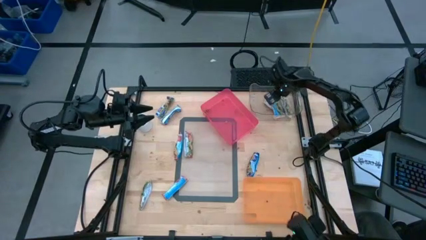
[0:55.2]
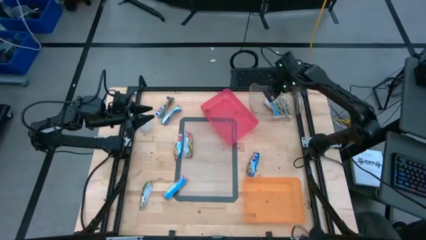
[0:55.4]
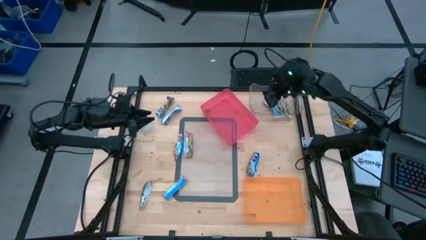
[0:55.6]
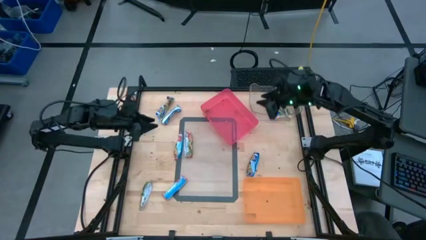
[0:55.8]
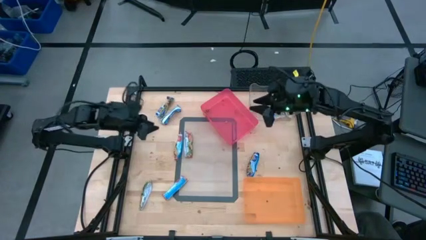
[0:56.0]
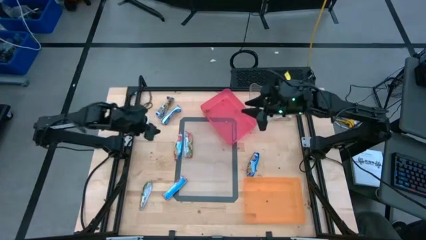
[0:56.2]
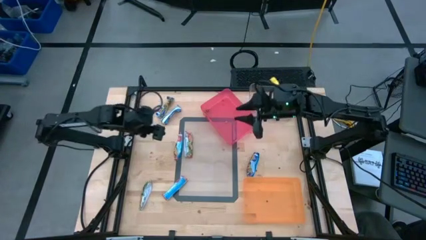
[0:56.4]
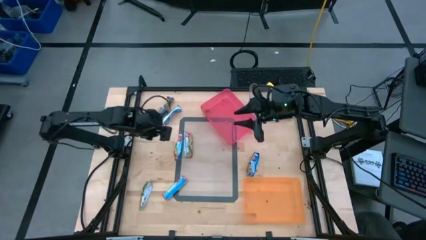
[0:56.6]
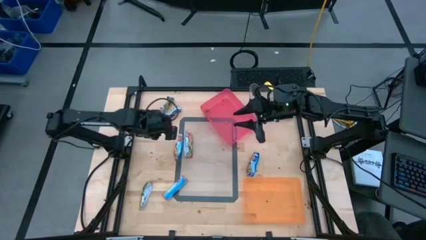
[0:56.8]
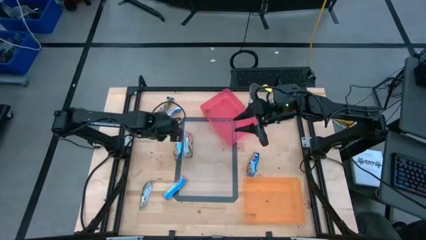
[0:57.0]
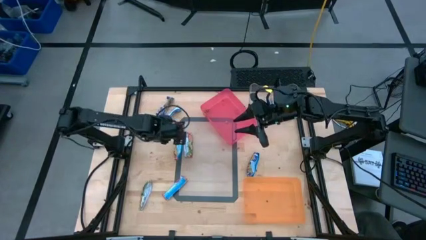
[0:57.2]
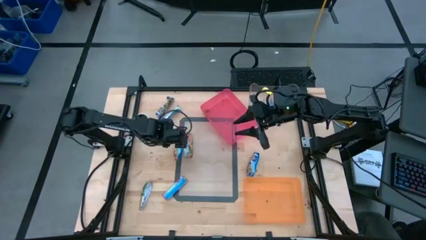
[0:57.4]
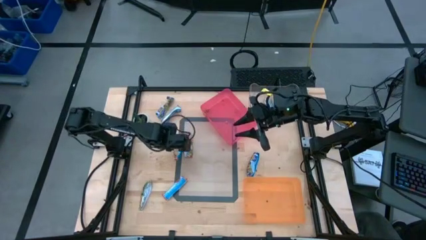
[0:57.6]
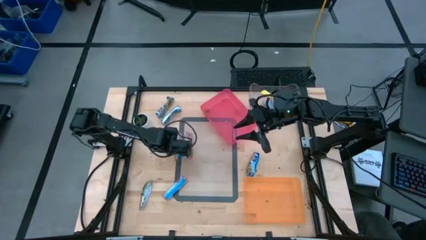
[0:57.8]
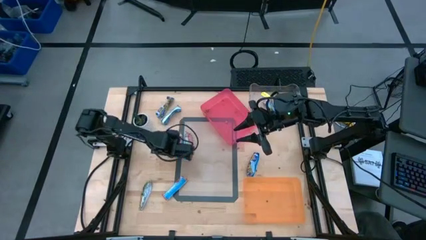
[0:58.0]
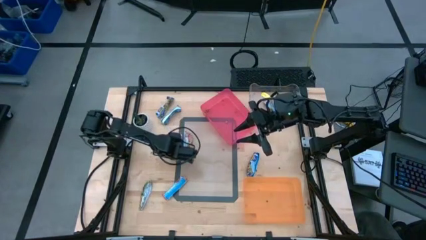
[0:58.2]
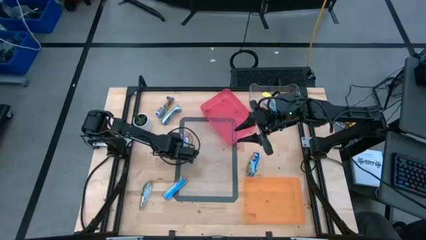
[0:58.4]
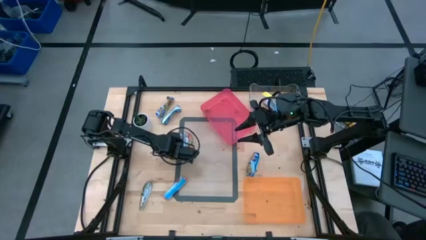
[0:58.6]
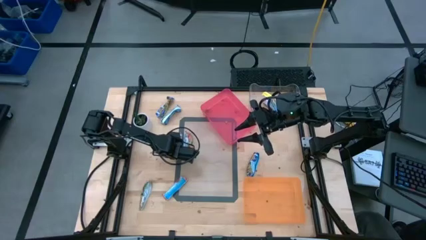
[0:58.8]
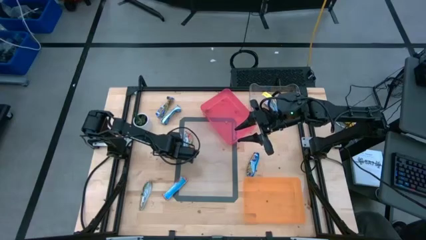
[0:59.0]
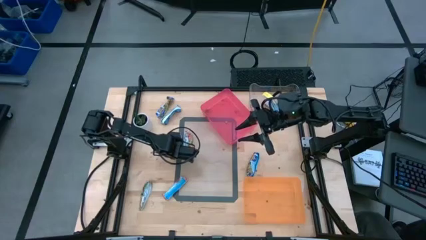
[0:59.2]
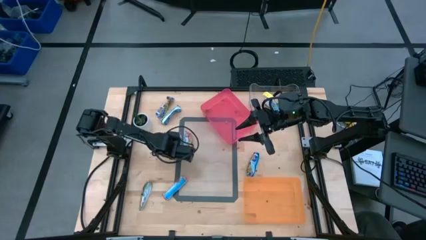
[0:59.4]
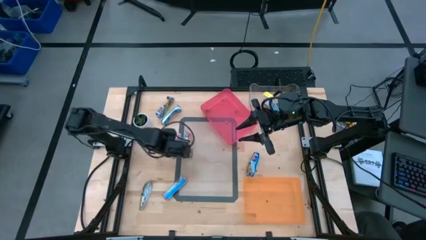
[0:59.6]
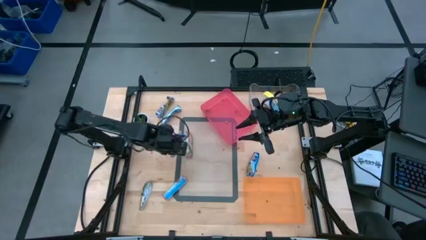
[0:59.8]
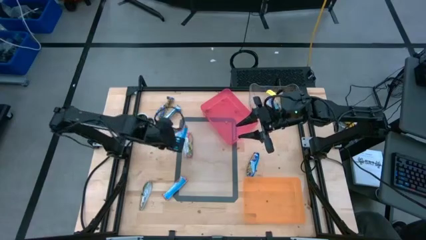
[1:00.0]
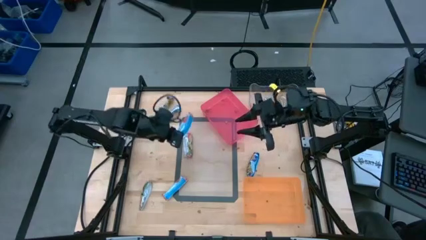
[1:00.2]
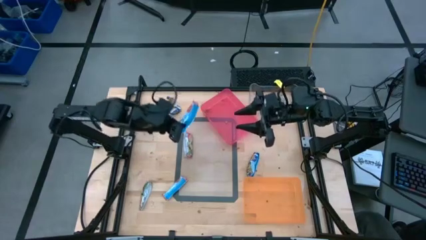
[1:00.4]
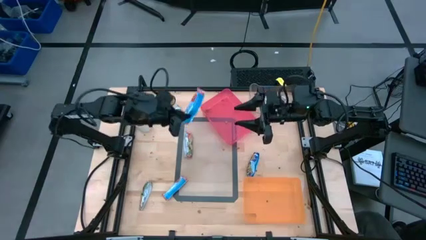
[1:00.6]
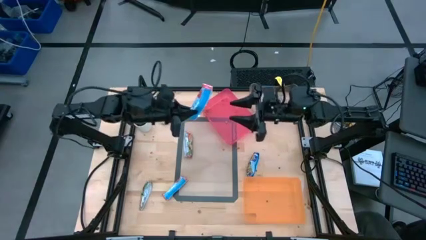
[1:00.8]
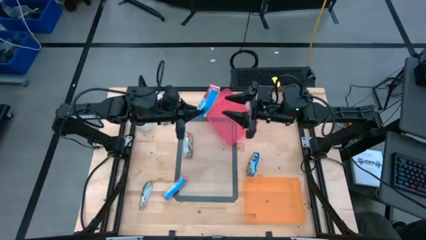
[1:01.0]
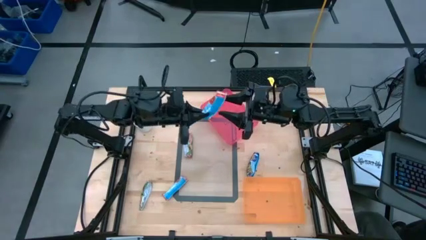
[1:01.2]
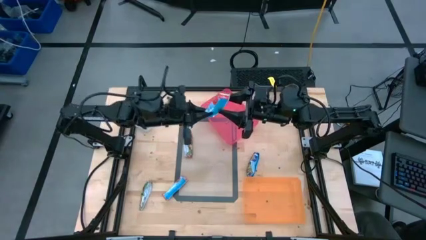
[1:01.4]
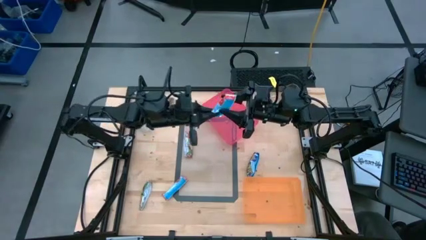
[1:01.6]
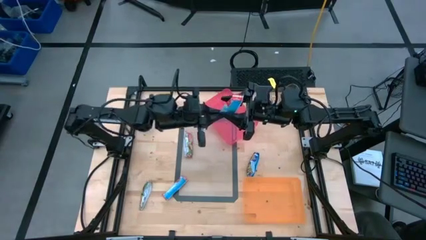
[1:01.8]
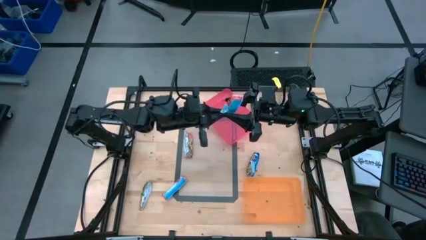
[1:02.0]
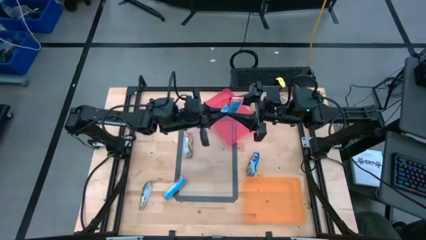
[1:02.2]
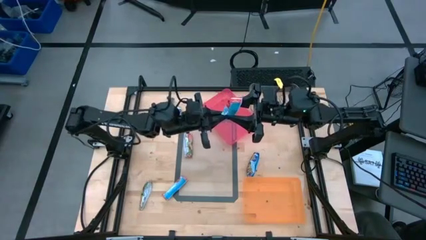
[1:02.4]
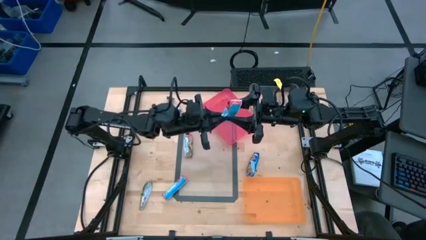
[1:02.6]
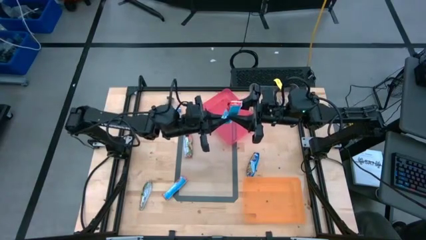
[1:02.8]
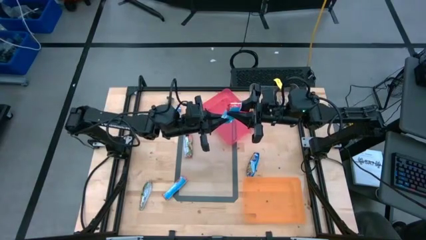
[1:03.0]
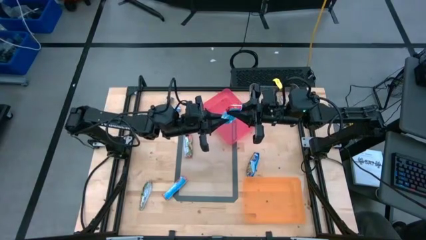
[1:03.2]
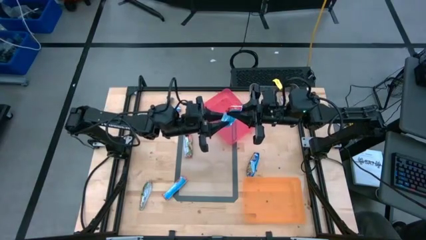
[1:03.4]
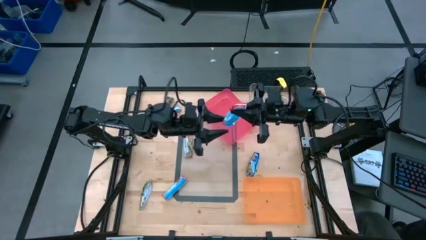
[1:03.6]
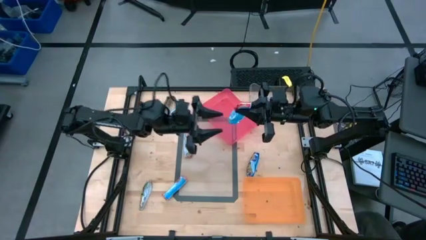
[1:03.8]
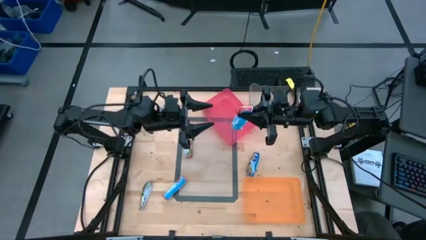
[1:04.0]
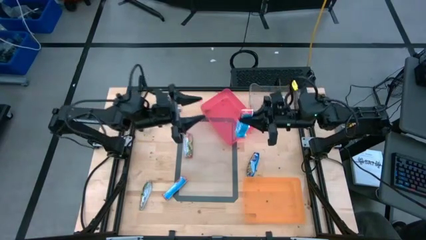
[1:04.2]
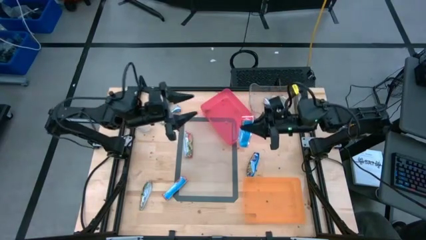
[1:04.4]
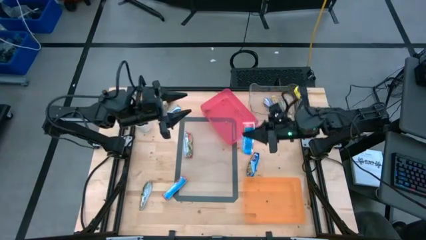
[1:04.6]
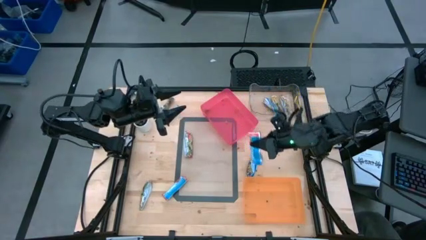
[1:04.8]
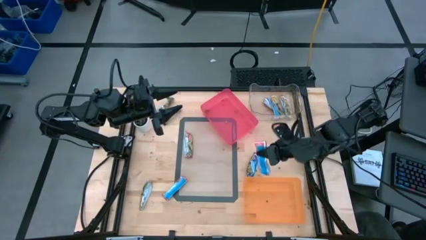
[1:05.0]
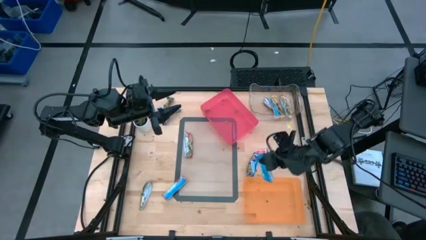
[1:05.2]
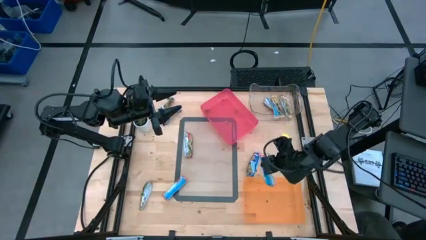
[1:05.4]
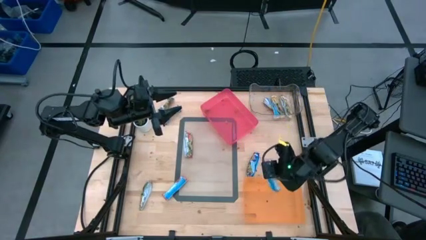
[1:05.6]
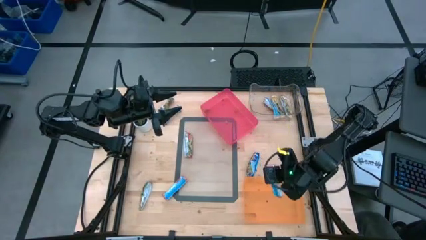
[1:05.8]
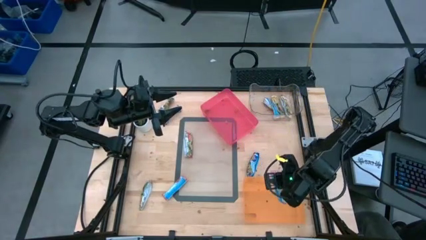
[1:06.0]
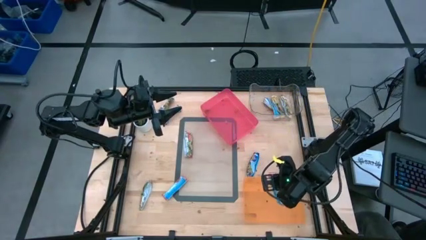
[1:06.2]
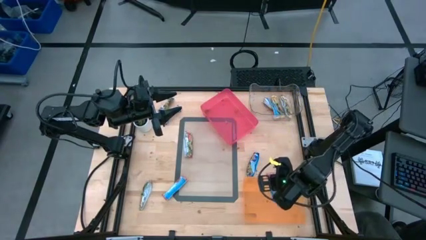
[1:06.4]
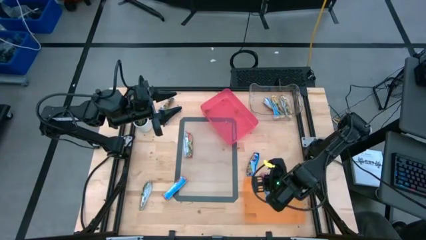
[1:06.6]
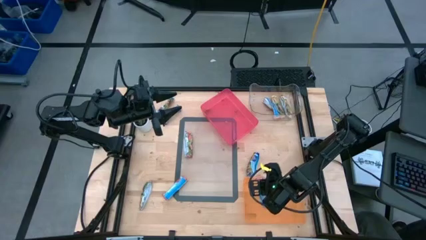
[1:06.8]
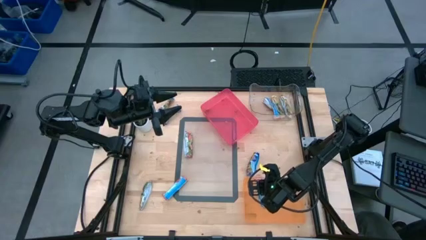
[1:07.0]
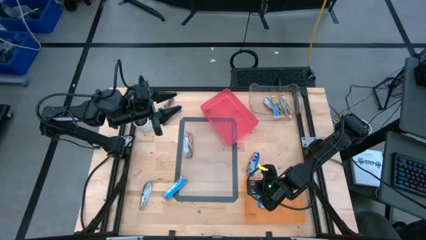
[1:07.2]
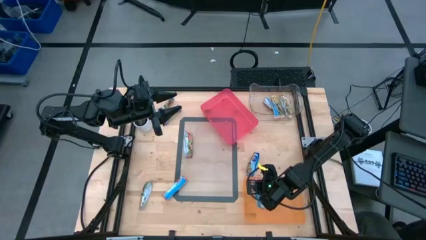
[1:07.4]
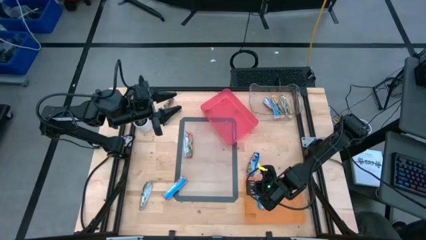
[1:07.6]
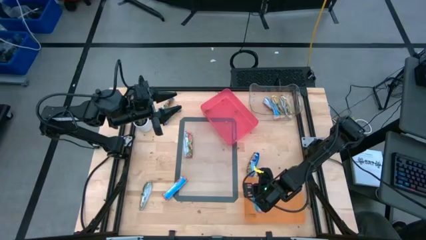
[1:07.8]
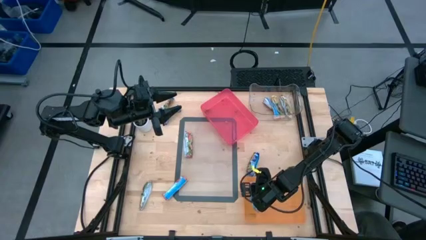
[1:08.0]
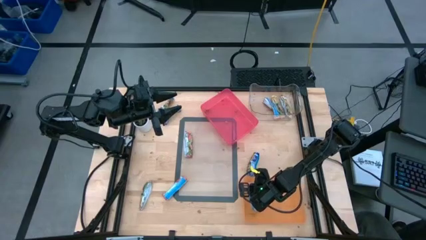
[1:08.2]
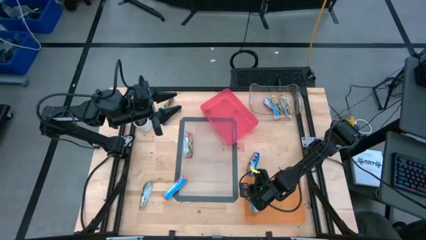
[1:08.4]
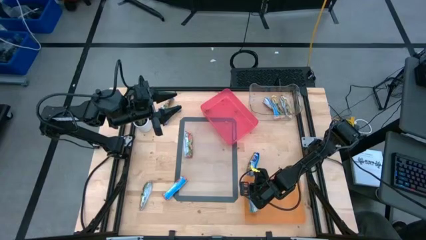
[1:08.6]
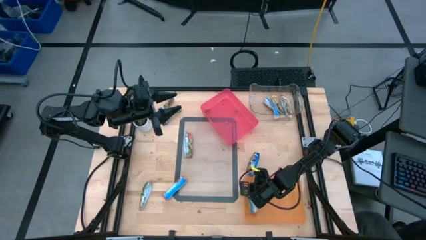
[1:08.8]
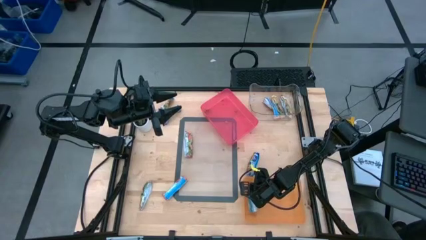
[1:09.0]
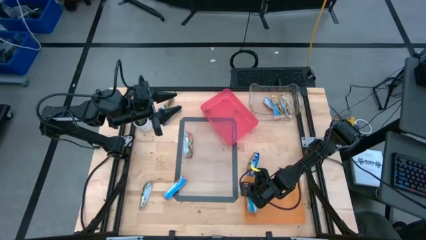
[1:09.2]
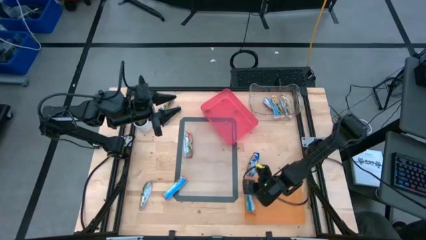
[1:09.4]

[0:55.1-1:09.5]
Task: Pick and place Granola Bars by type
Put the red granola bar into the orange bin
